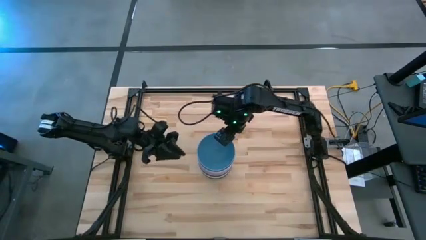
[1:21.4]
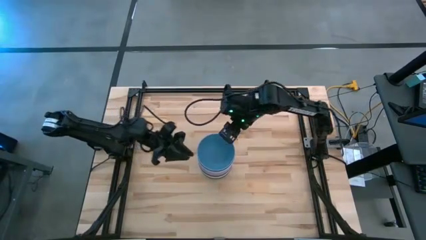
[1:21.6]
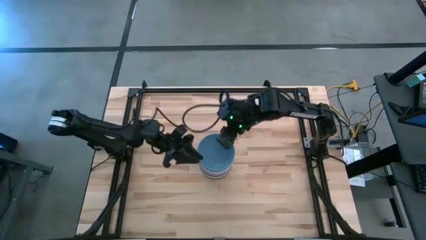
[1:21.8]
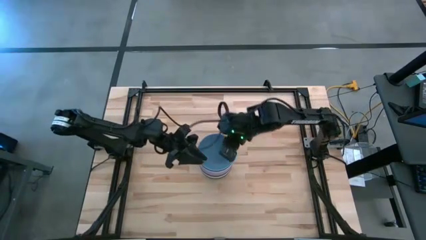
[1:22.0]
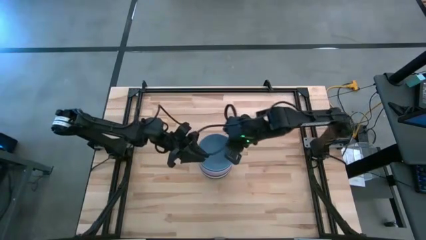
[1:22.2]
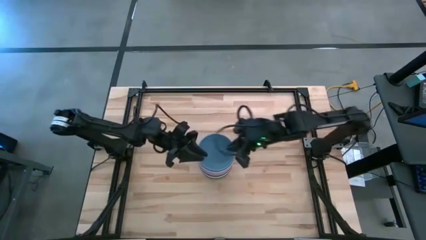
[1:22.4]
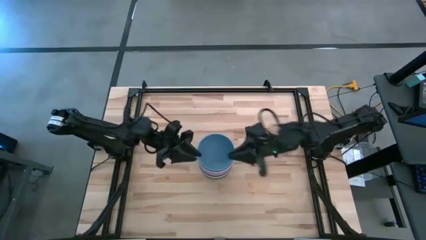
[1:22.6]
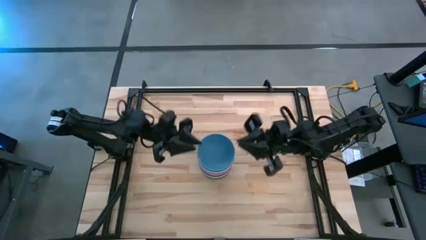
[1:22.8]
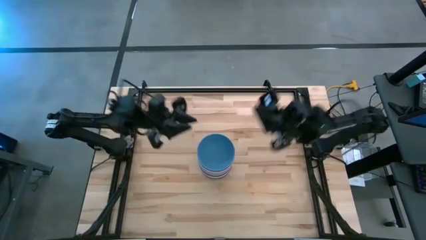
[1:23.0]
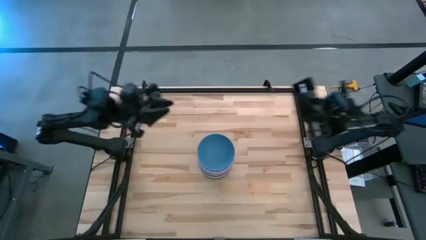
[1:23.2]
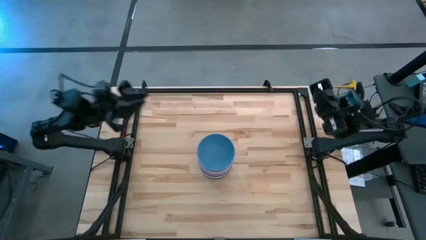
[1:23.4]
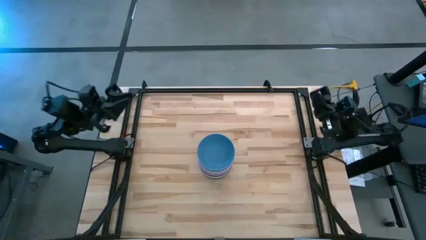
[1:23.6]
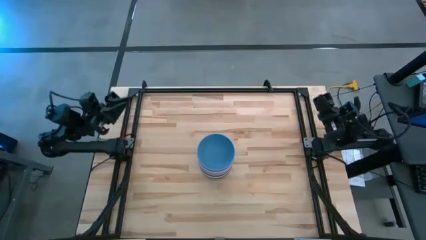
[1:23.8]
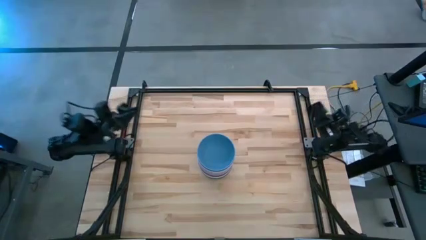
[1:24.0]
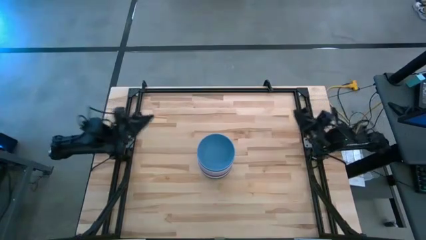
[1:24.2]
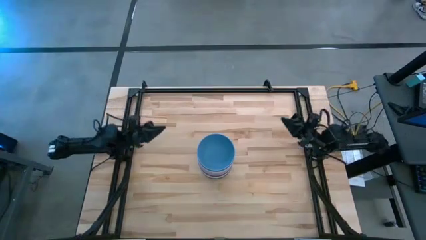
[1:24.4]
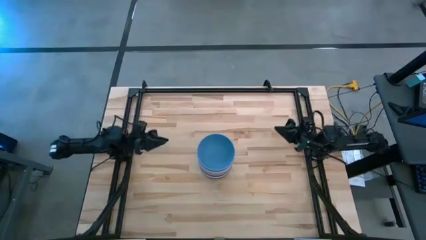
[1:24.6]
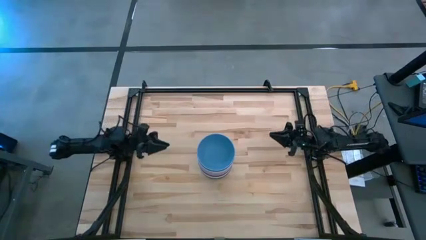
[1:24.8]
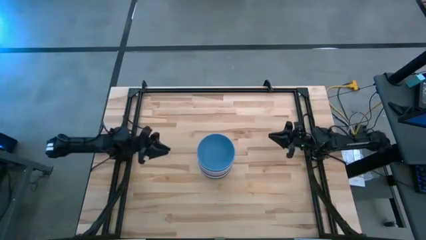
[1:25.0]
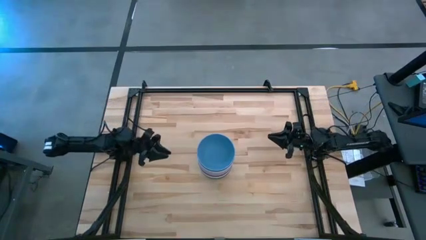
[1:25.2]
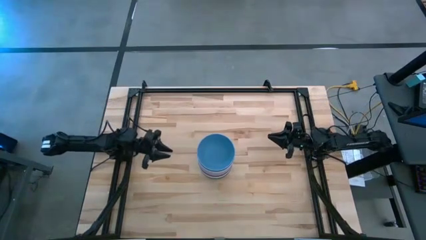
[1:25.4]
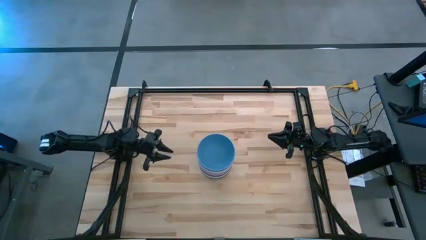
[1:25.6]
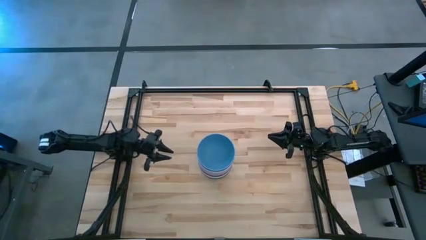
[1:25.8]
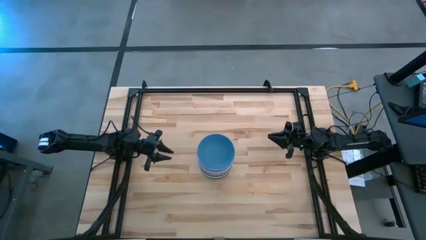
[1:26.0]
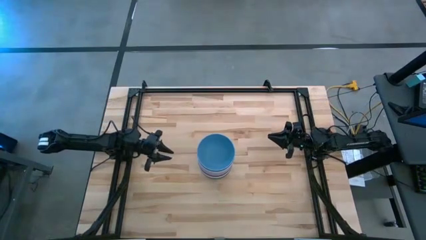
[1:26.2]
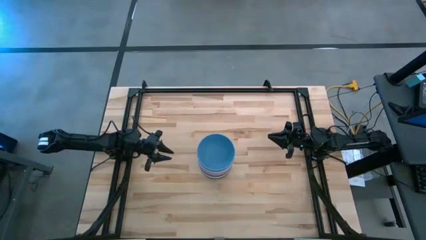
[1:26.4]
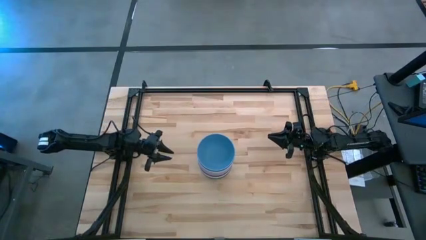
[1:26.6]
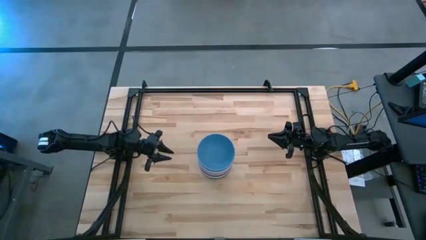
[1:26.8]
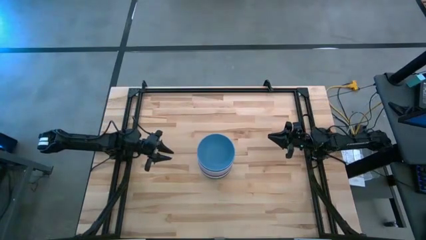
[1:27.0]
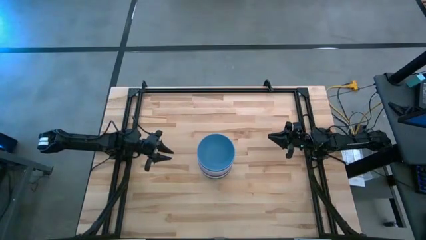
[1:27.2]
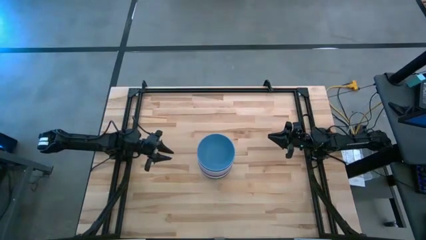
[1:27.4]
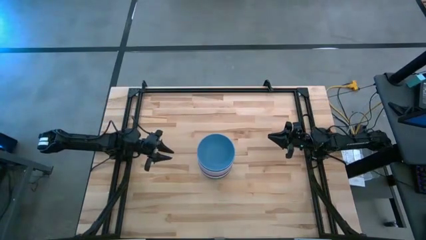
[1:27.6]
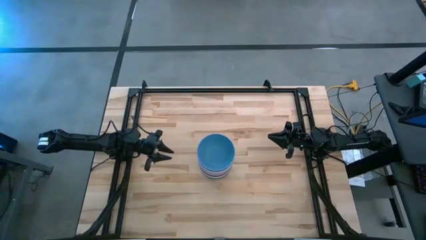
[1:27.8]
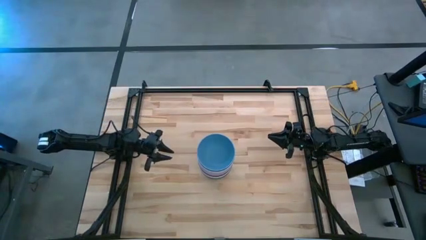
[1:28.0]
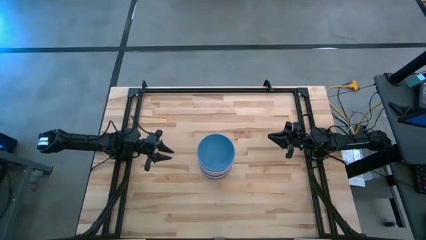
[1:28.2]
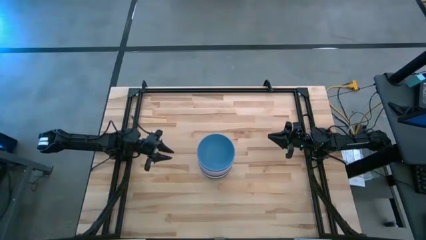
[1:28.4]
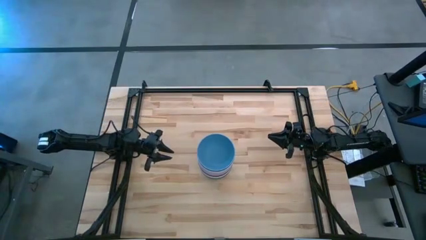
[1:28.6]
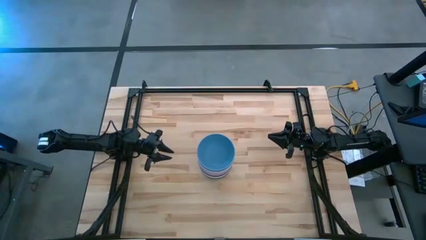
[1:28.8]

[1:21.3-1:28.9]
Task: Nest bowls inside each other
Return to Home Position

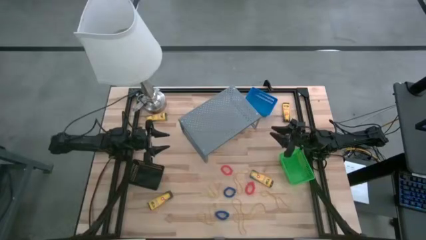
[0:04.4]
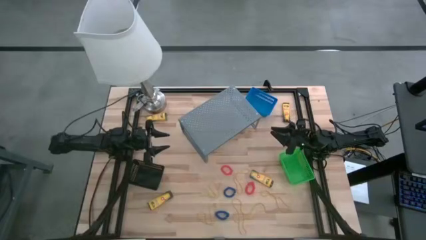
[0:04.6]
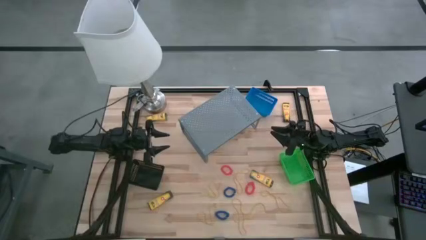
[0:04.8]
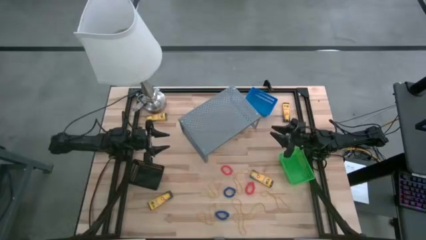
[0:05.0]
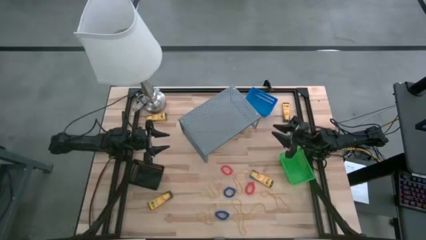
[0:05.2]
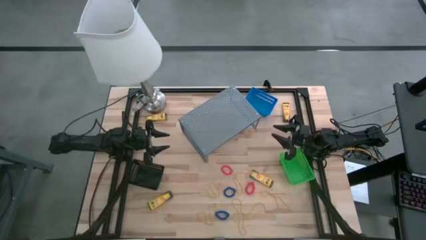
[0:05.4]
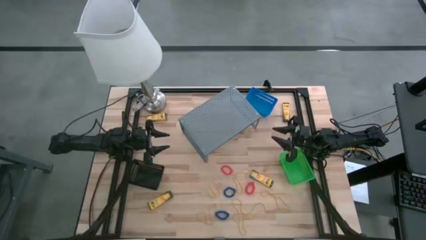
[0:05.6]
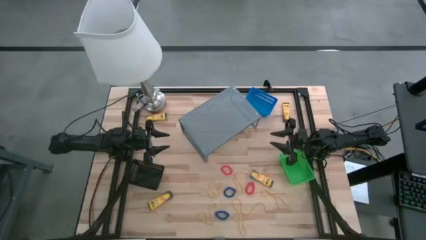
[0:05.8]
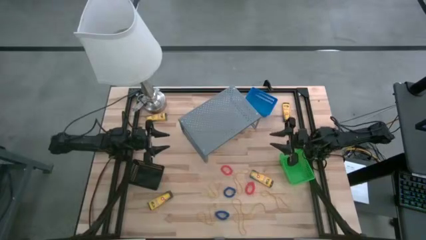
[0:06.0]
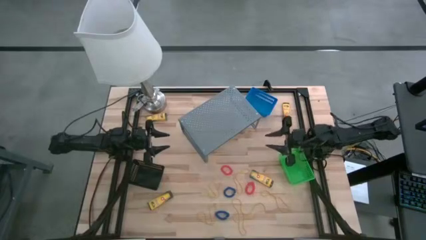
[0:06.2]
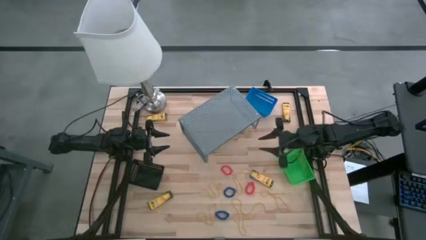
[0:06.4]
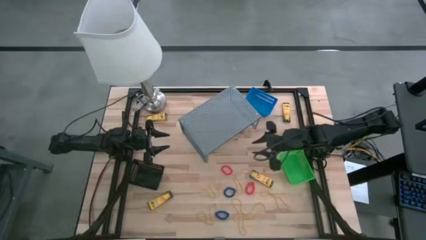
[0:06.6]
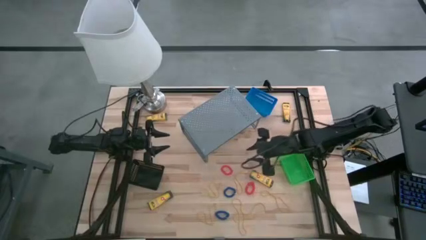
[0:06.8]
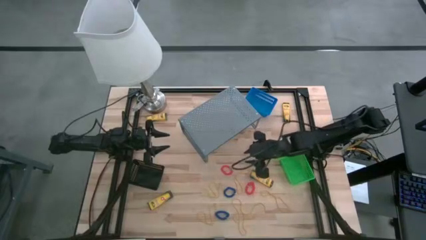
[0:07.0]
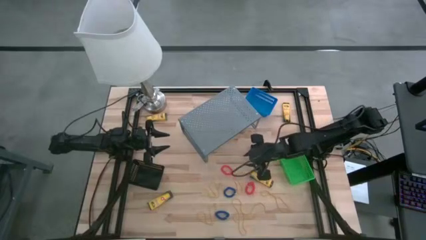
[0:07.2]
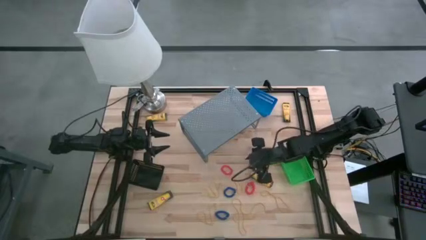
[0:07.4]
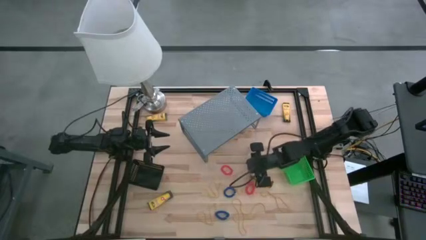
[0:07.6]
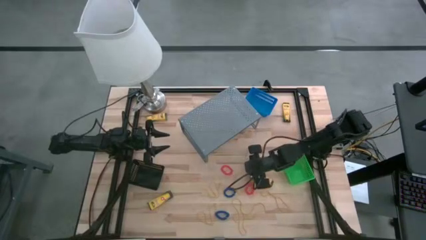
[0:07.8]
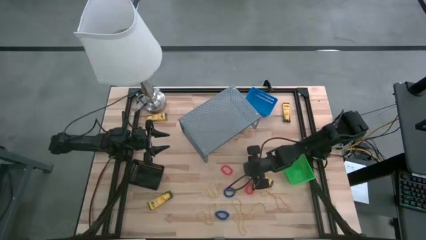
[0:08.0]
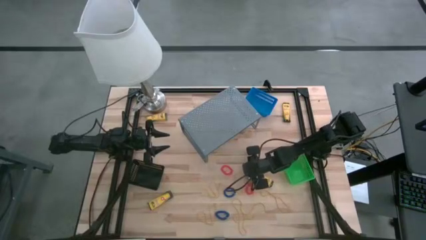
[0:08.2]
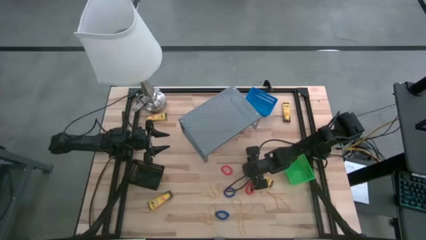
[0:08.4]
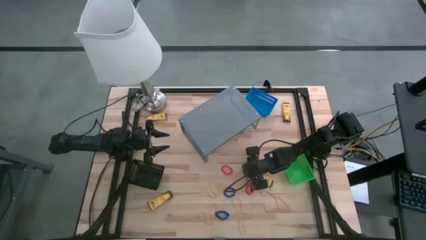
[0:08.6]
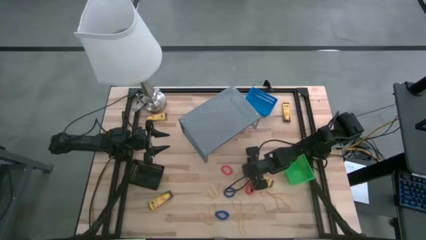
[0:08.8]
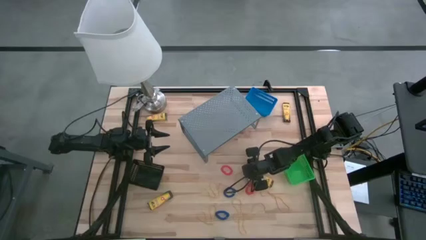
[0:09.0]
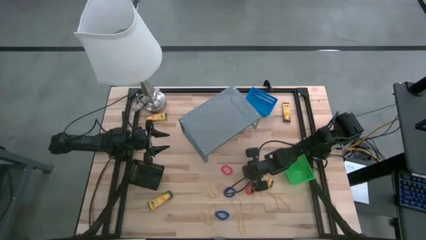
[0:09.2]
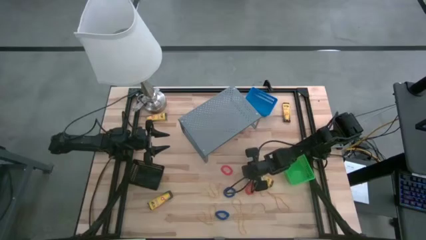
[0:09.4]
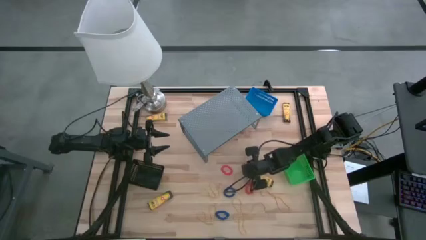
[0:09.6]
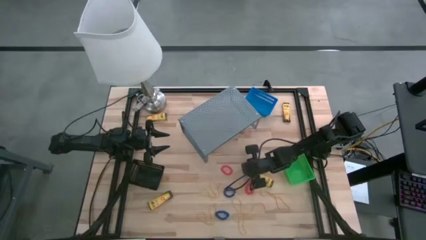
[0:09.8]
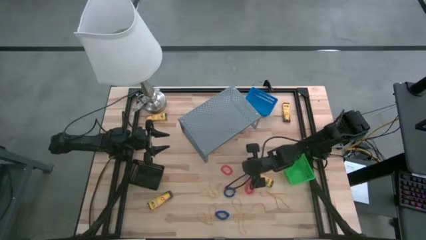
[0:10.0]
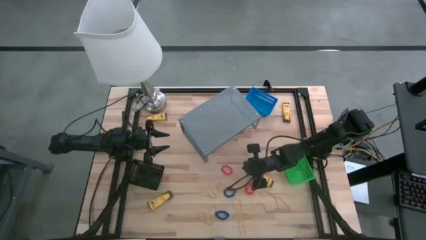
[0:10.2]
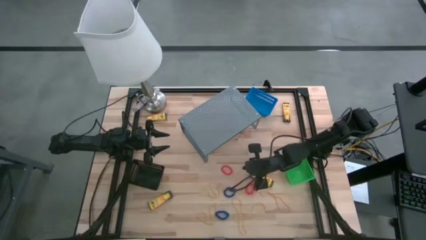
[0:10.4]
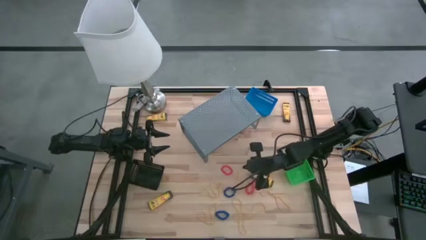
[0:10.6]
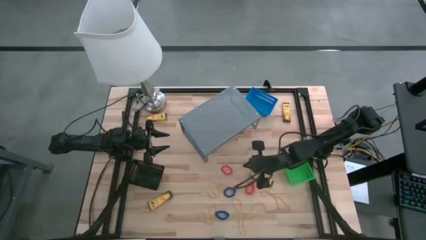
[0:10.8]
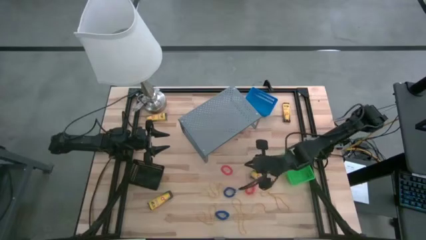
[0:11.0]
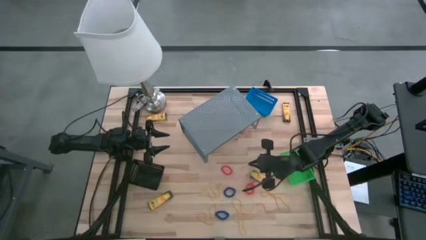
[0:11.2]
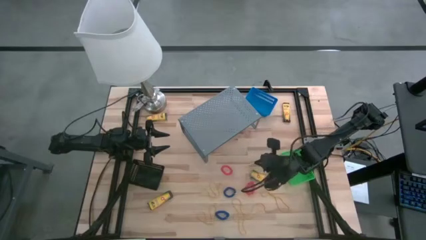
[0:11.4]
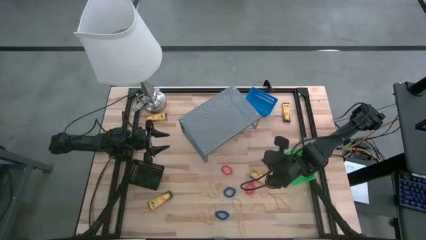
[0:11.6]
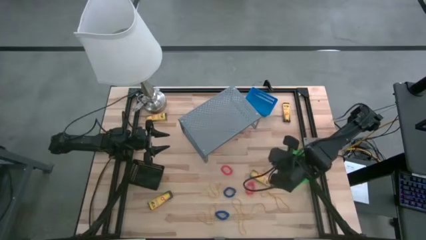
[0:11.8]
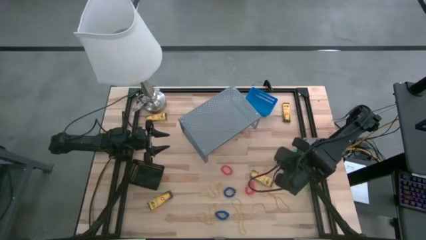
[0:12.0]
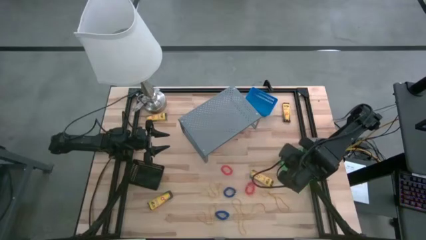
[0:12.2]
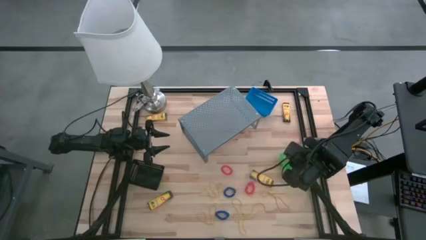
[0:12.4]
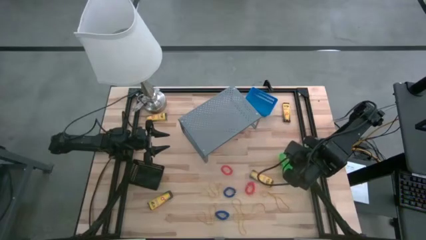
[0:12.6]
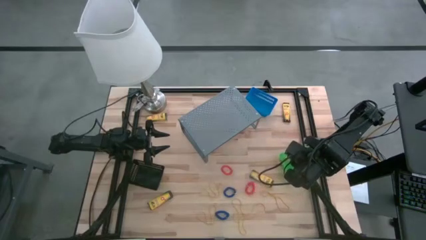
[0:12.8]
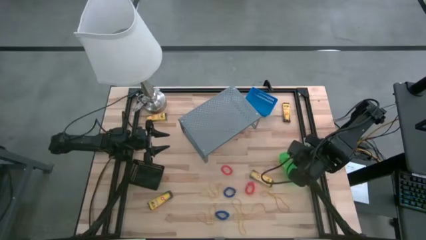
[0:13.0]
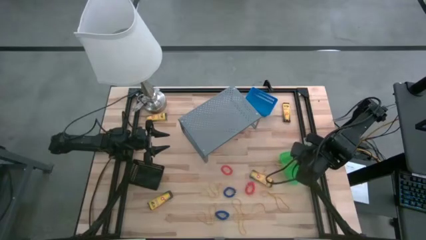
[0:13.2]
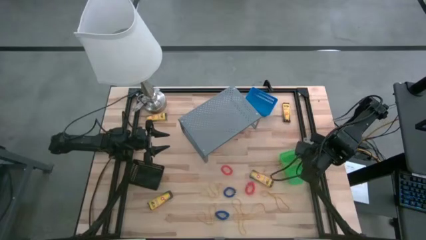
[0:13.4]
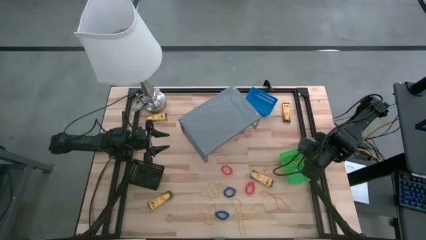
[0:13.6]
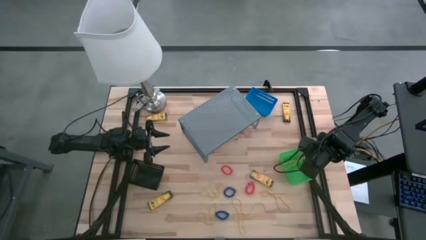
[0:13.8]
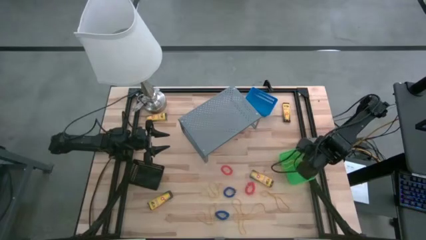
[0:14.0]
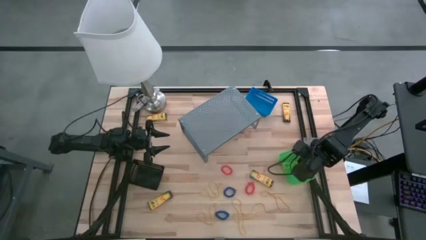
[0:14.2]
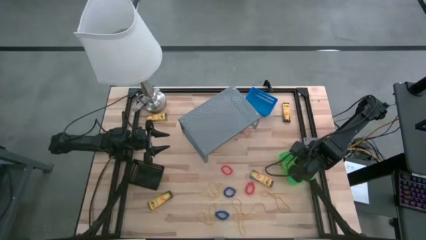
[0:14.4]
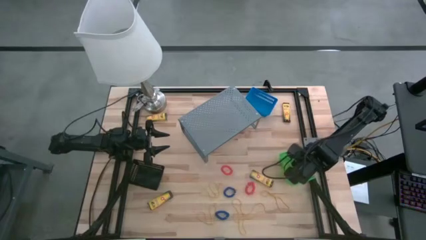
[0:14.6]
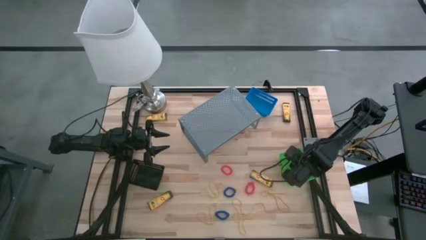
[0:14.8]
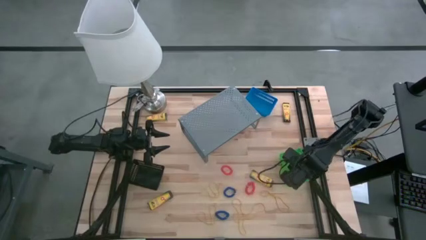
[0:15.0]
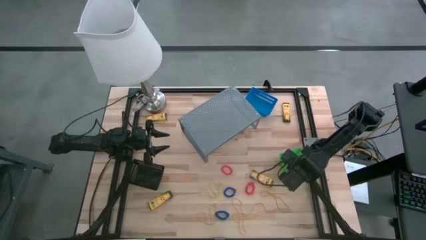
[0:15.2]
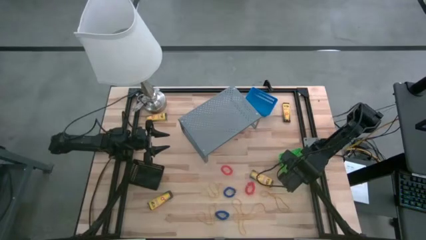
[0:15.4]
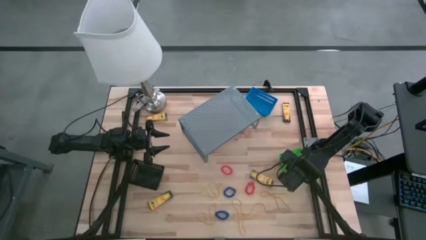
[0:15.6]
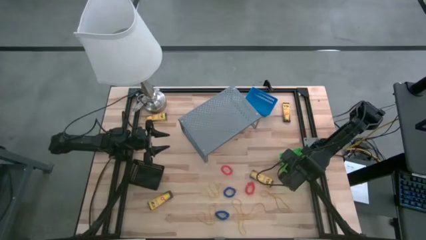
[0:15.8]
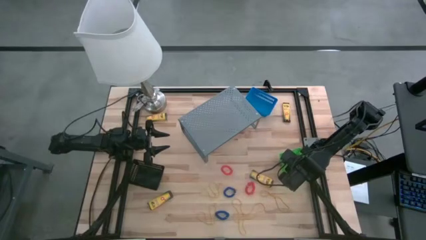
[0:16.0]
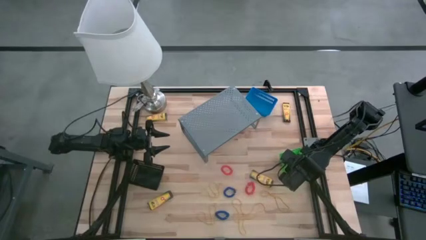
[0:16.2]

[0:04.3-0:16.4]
Task: Pick & Place Office Desk Supplies
Put the yellow rubber band into the green basket
